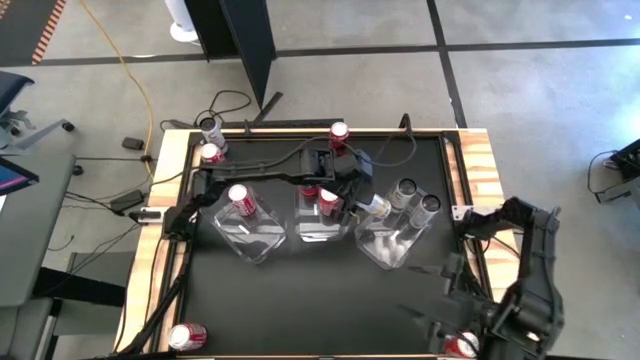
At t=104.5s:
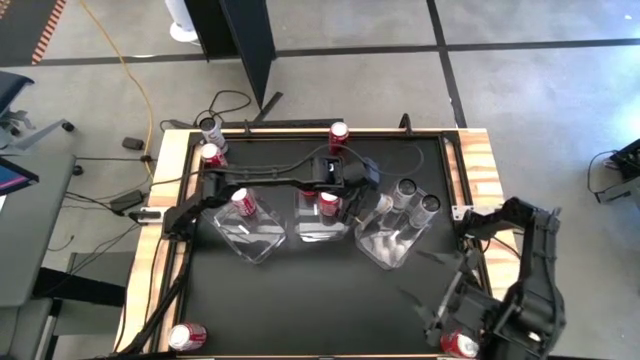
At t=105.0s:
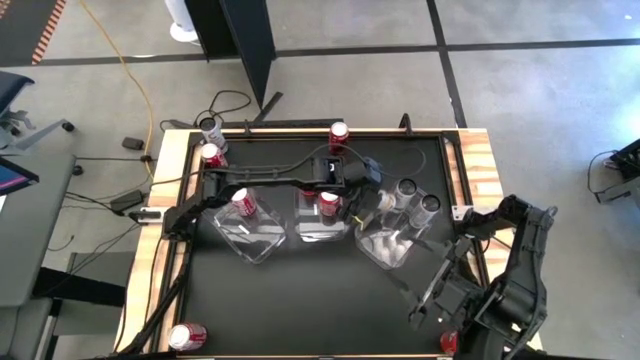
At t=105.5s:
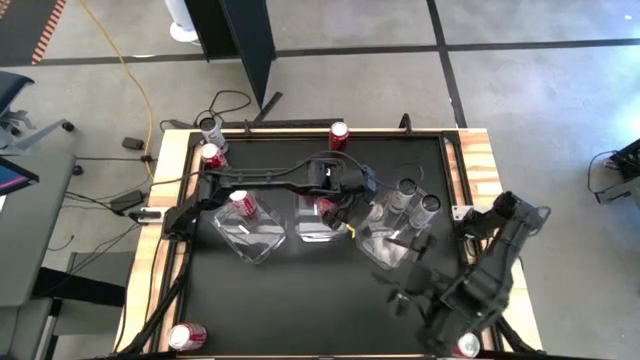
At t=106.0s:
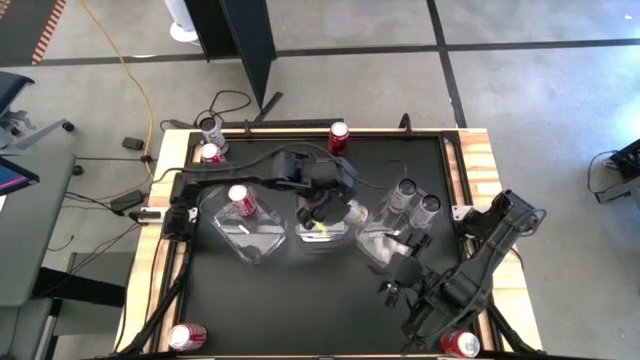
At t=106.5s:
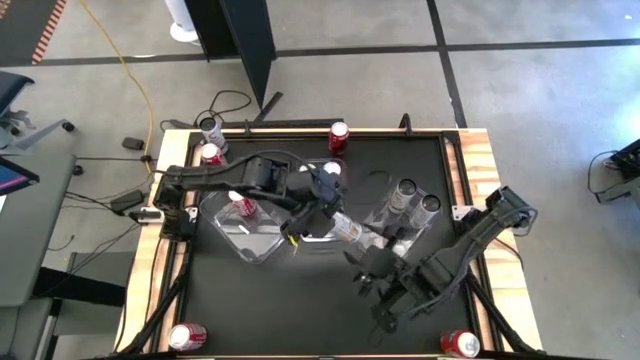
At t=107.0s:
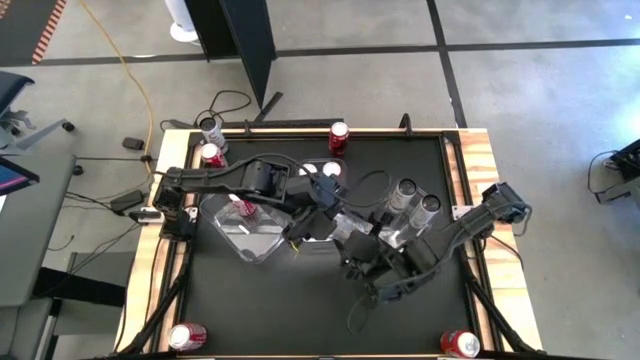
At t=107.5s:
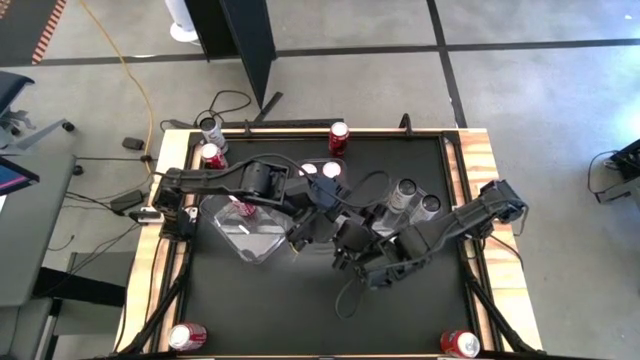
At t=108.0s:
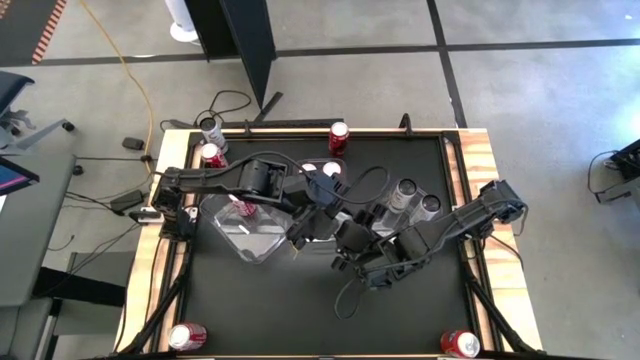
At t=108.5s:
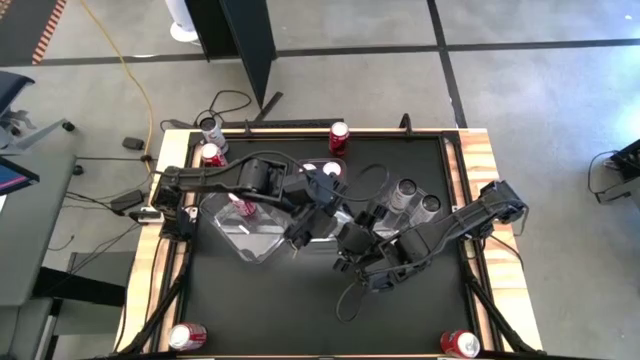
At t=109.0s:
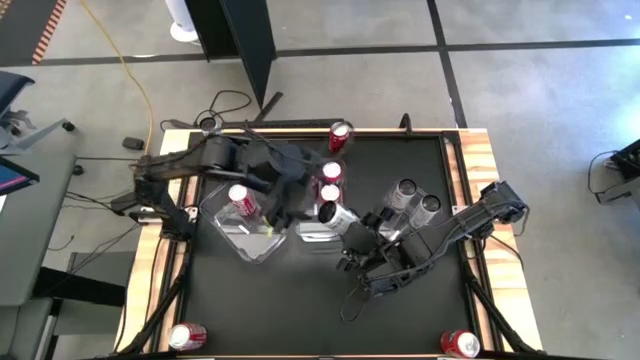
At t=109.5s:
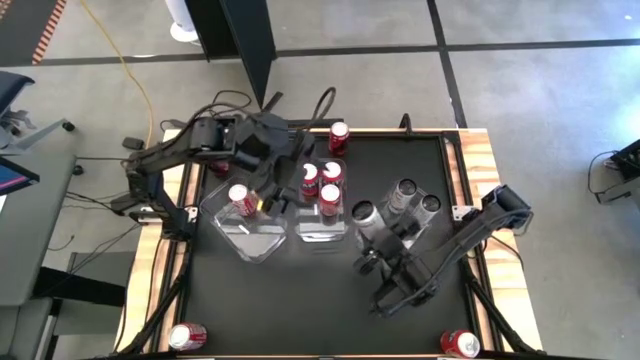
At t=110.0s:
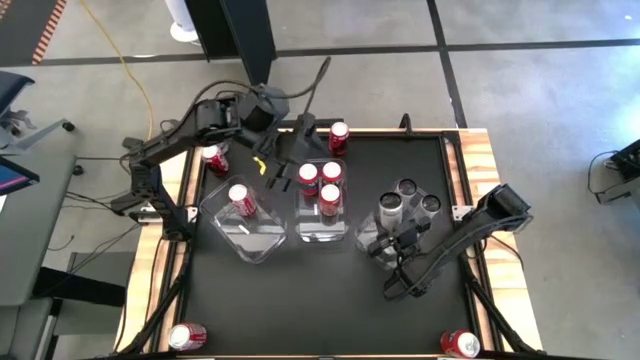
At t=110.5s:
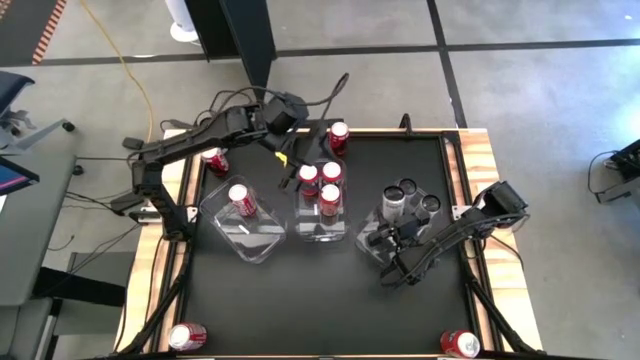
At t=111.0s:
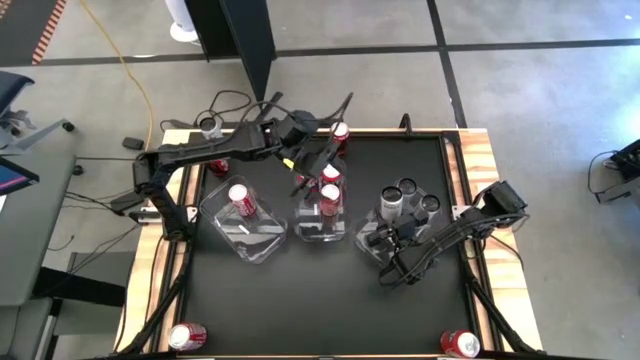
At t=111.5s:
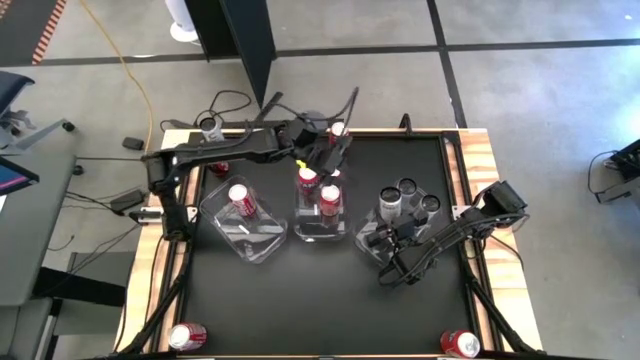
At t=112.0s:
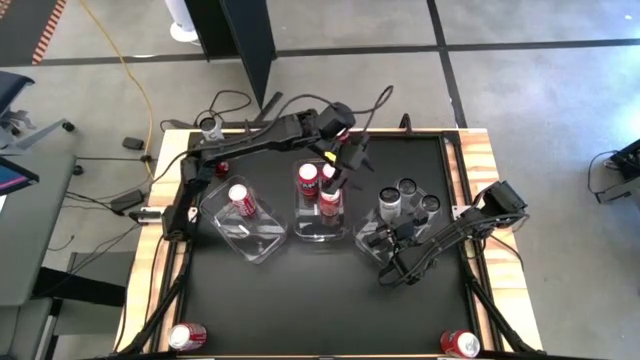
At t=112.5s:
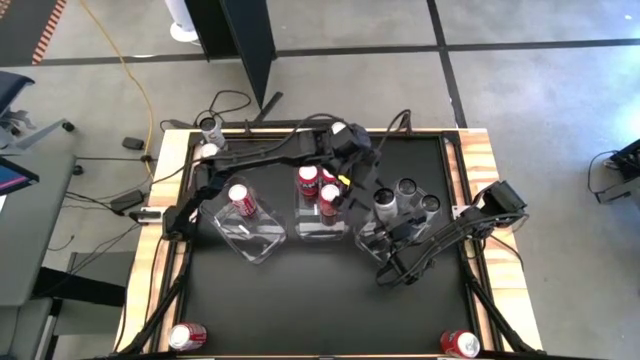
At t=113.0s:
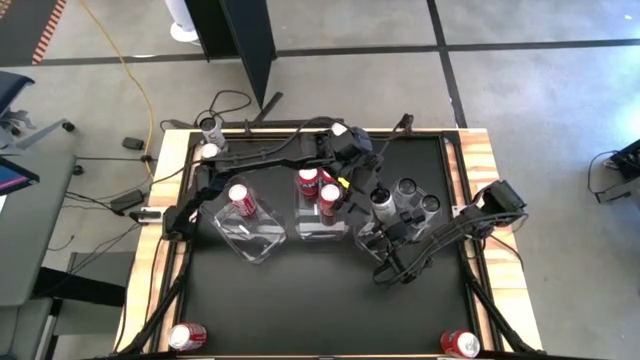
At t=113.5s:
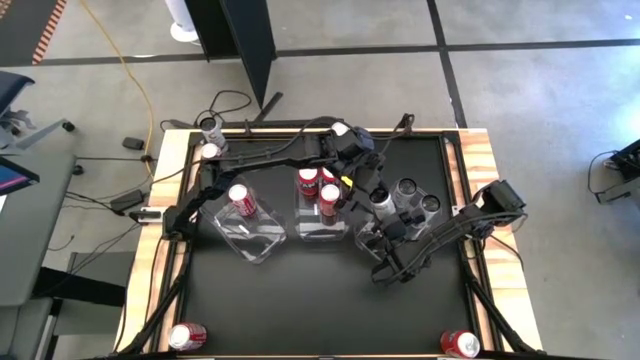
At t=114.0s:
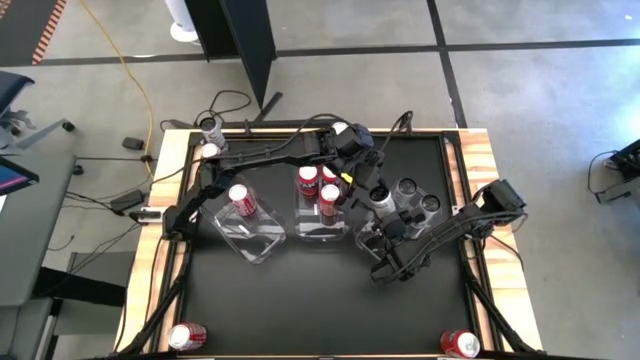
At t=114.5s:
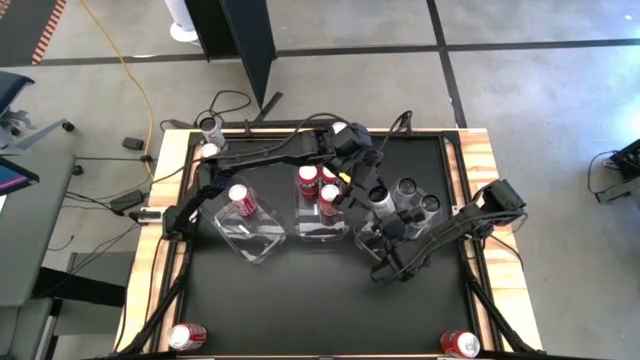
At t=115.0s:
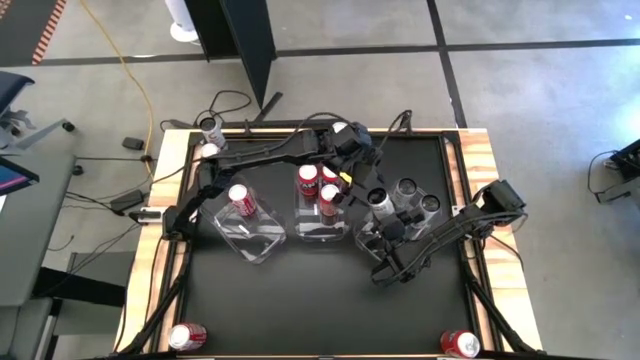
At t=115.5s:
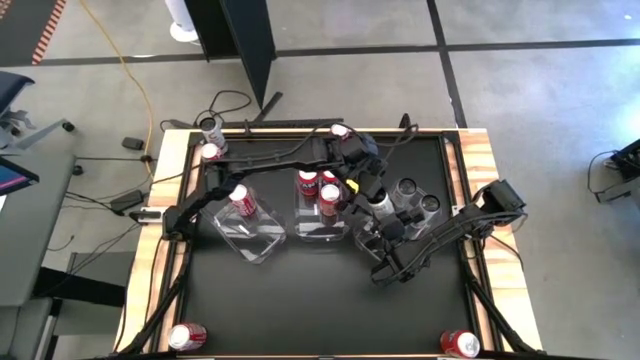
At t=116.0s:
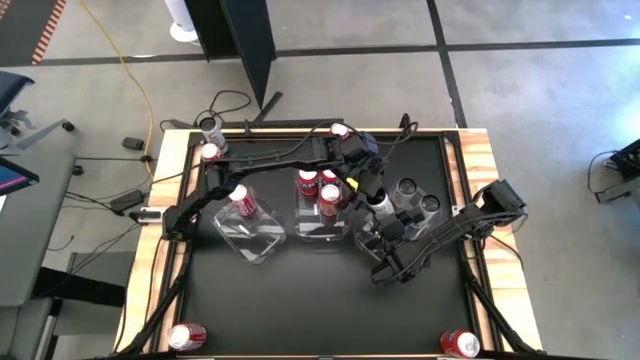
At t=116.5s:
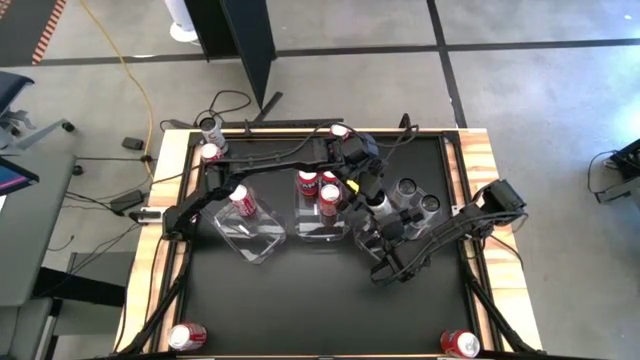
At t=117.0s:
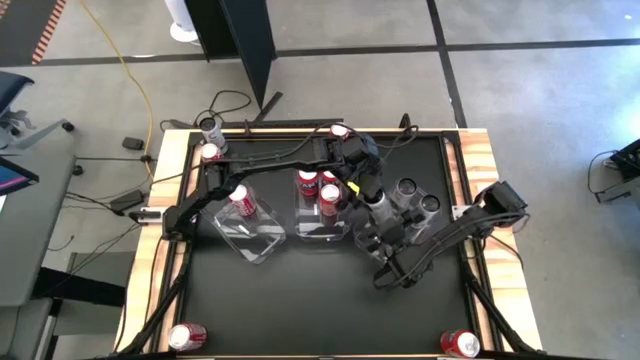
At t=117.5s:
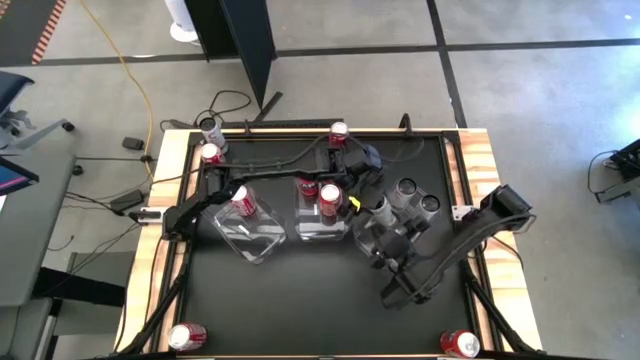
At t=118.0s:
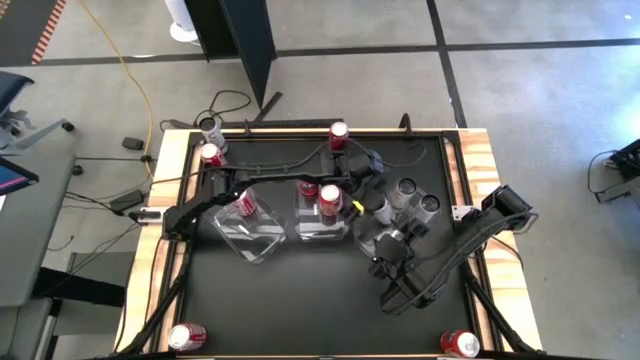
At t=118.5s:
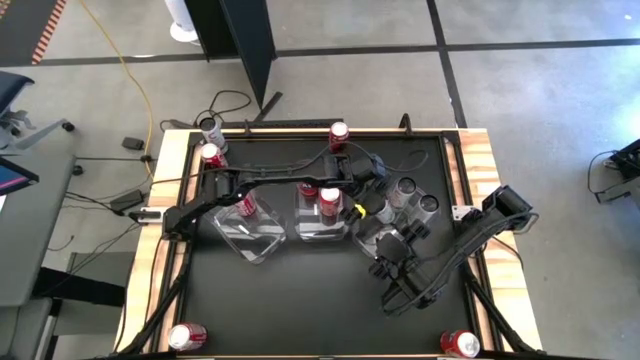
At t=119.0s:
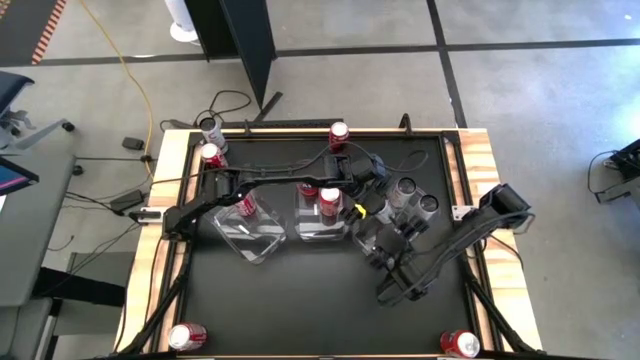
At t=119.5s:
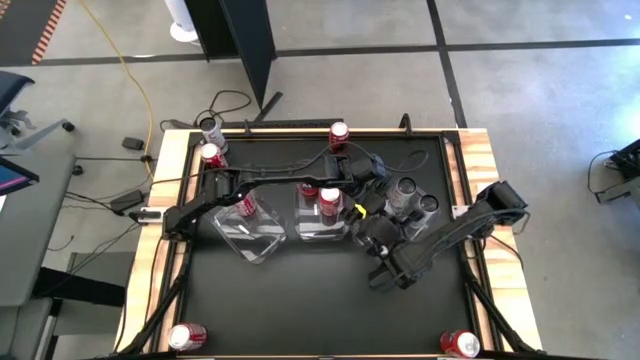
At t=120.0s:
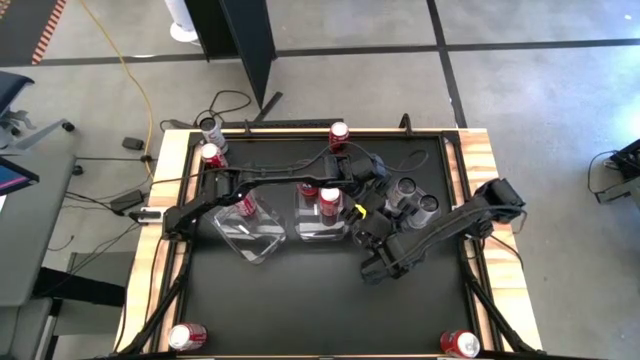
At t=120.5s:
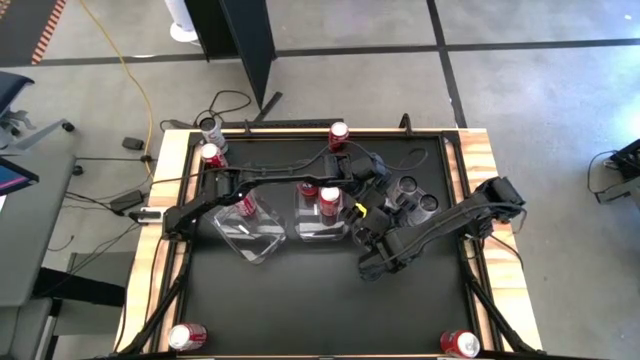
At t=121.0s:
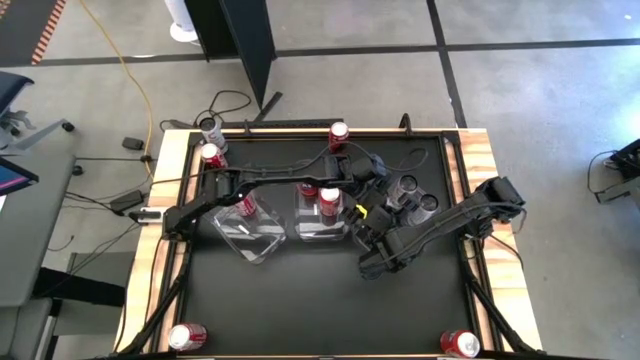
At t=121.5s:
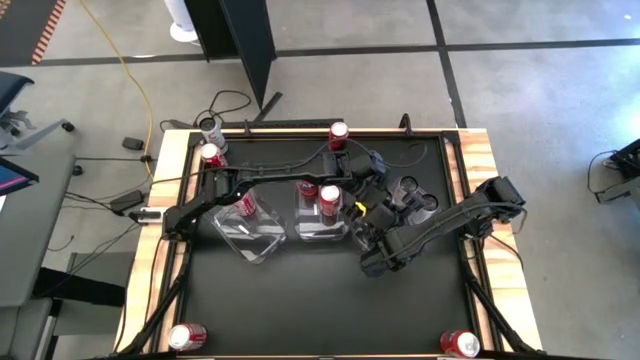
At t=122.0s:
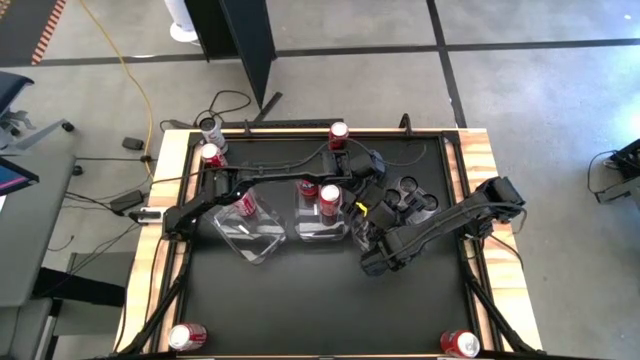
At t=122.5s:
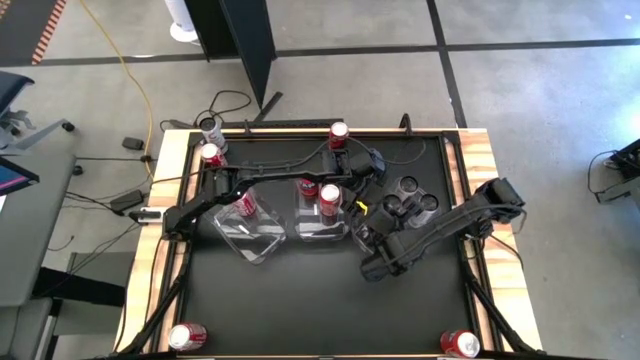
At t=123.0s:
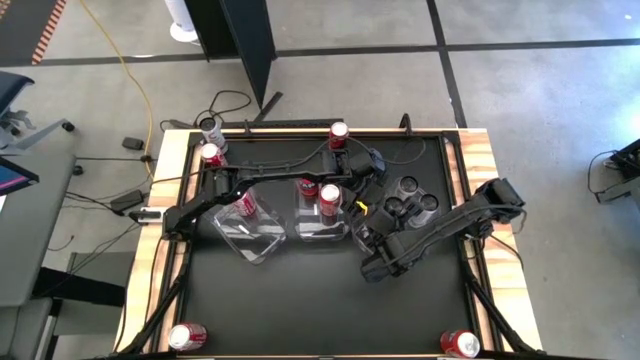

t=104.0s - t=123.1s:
Task: Sort soda cans
Put the bottom white soda can into the right transparent bin

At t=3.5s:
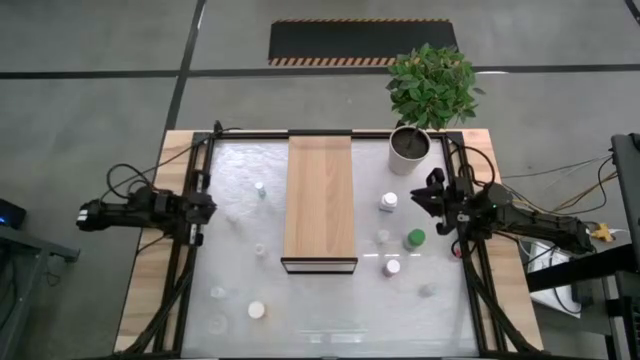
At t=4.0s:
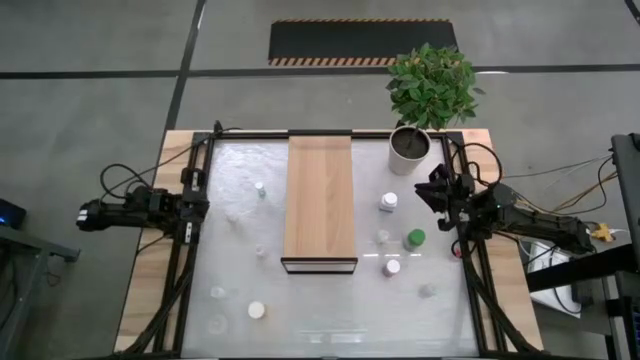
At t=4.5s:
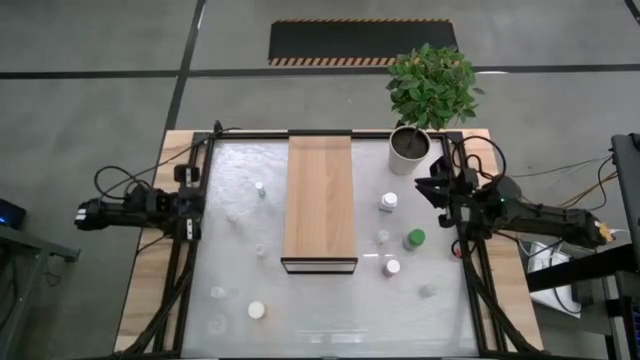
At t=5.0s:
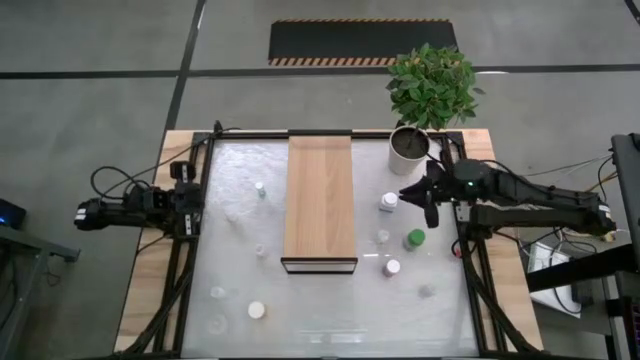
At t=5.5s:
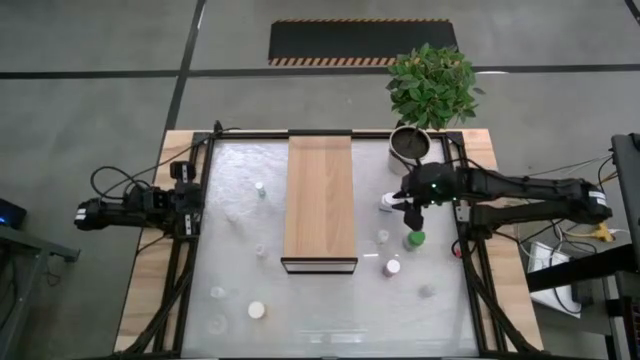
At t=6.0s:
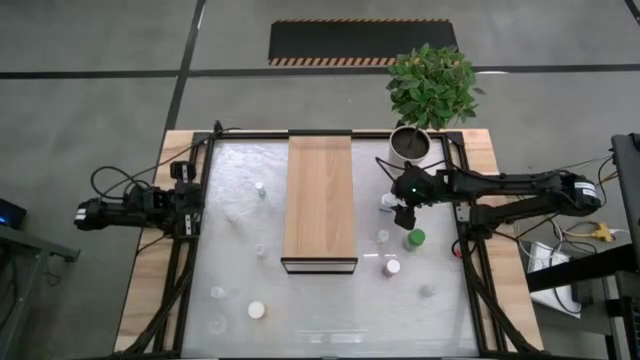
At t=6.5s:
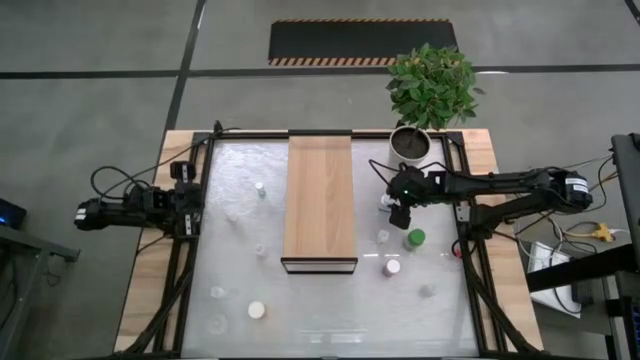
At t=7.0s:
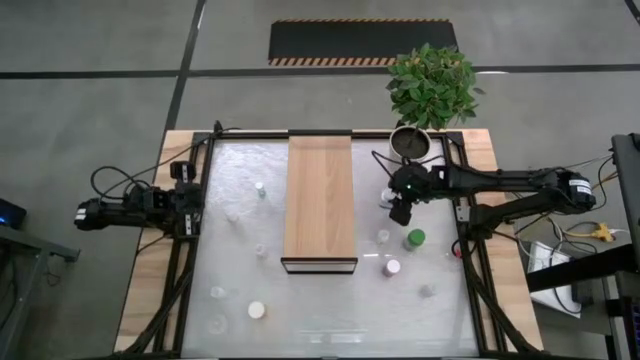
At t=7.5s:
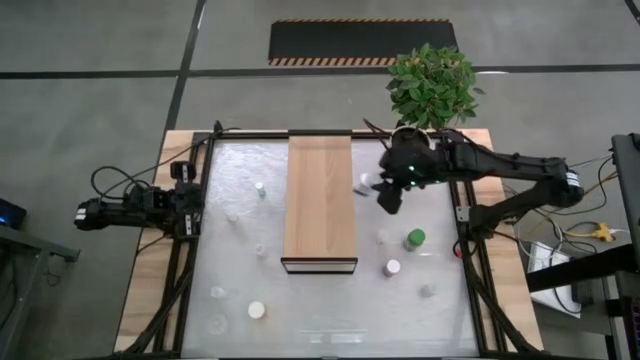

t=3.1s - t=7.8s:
Task: Pick and place medicine bottles onto shelf by color
Put the blue pill bottle on the shelf
